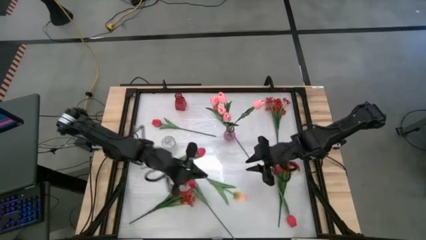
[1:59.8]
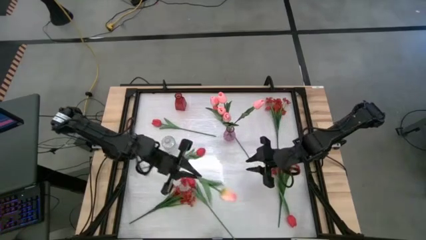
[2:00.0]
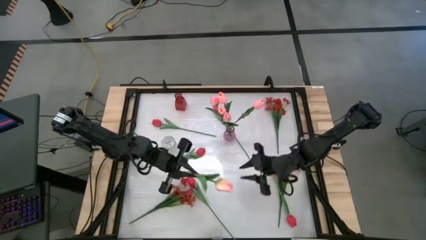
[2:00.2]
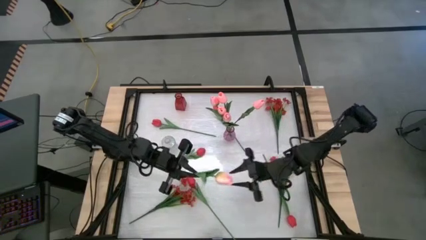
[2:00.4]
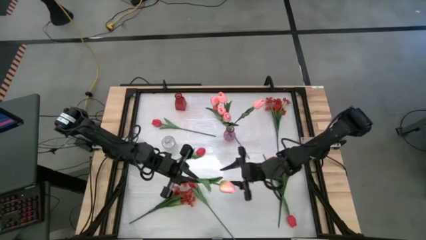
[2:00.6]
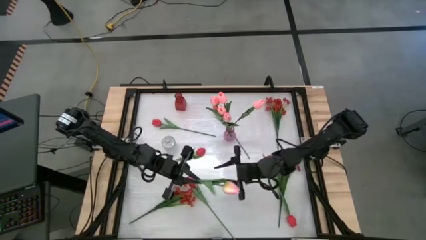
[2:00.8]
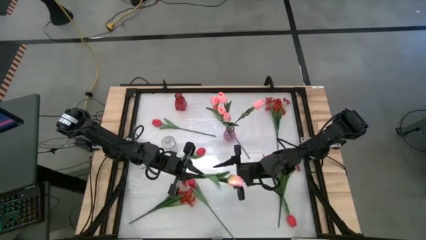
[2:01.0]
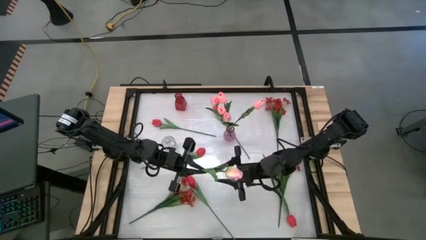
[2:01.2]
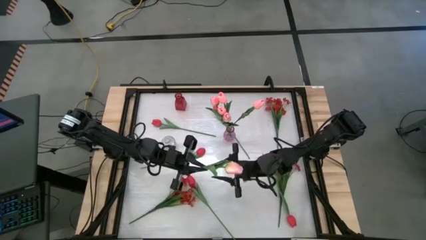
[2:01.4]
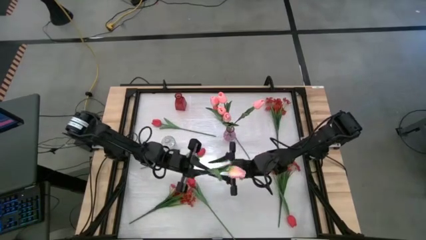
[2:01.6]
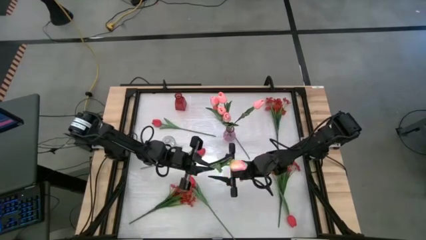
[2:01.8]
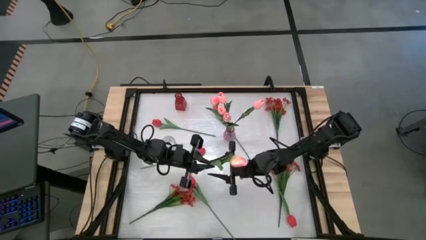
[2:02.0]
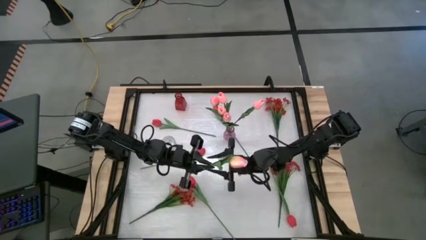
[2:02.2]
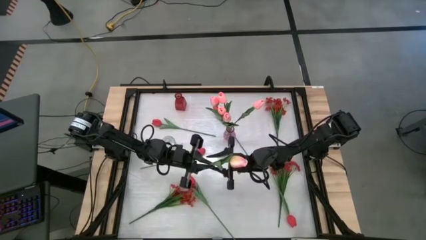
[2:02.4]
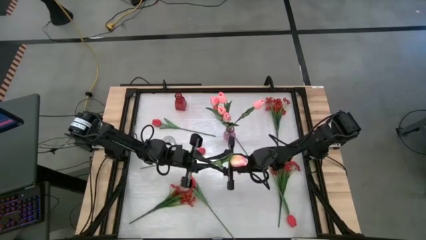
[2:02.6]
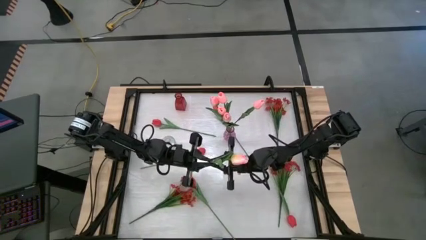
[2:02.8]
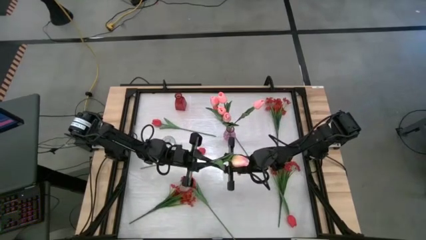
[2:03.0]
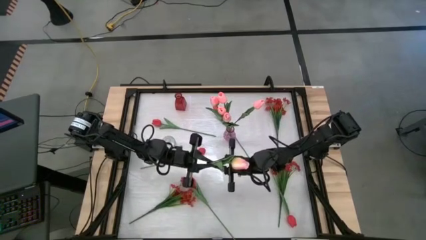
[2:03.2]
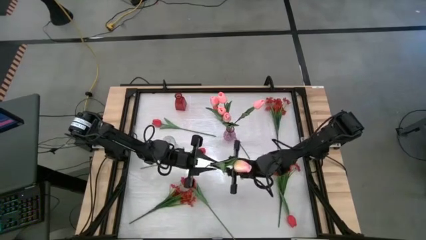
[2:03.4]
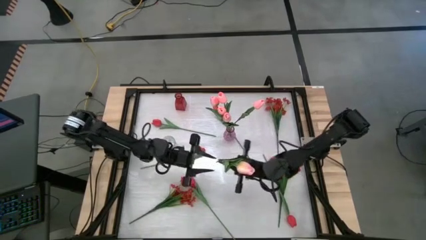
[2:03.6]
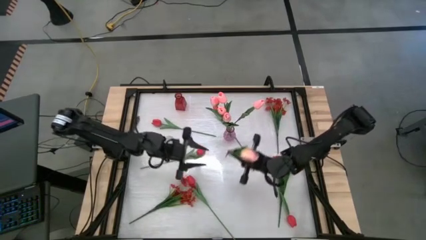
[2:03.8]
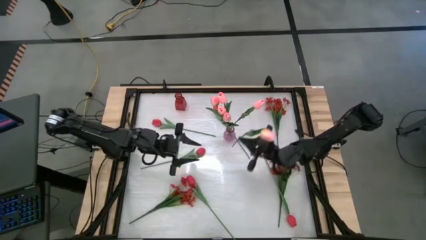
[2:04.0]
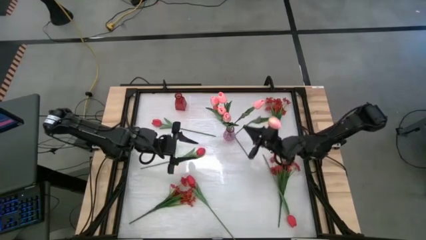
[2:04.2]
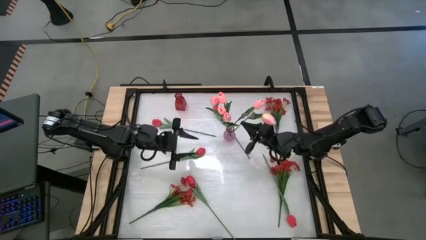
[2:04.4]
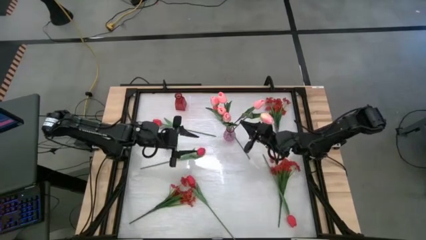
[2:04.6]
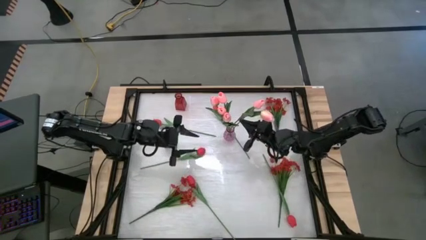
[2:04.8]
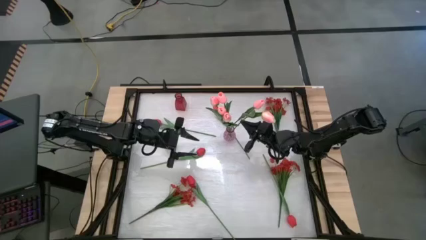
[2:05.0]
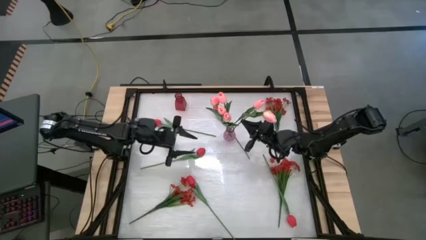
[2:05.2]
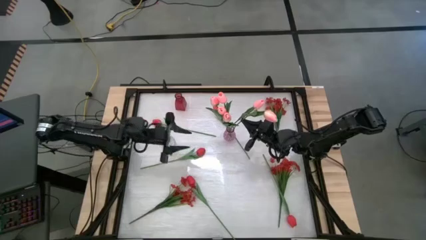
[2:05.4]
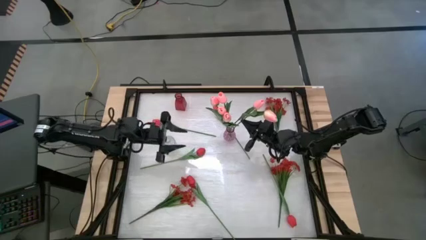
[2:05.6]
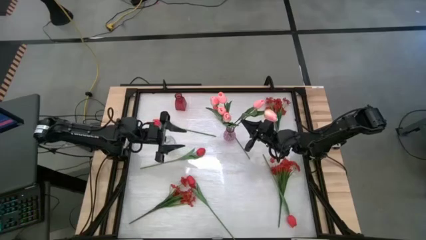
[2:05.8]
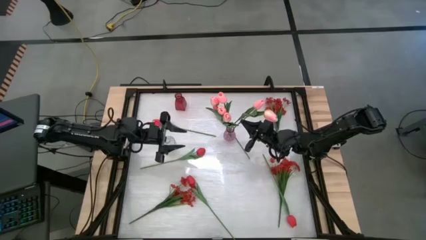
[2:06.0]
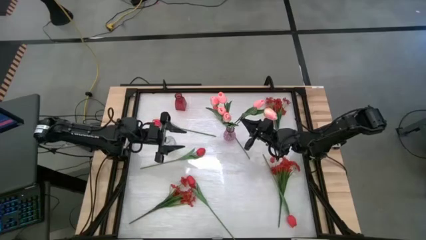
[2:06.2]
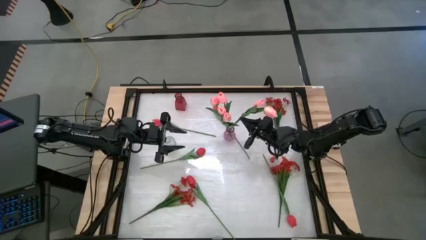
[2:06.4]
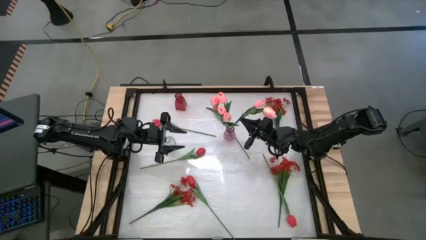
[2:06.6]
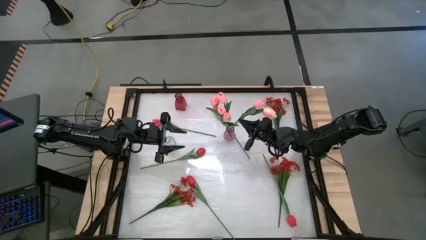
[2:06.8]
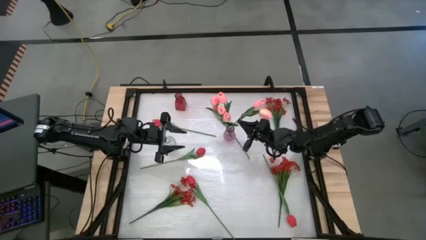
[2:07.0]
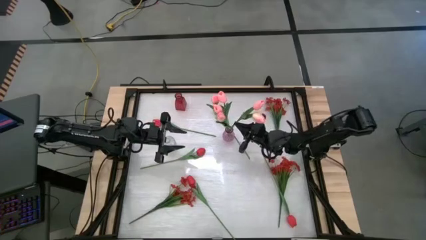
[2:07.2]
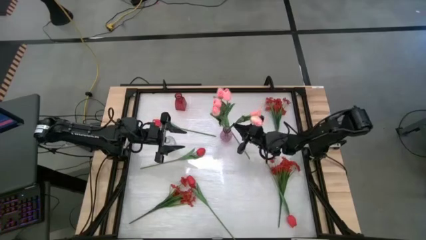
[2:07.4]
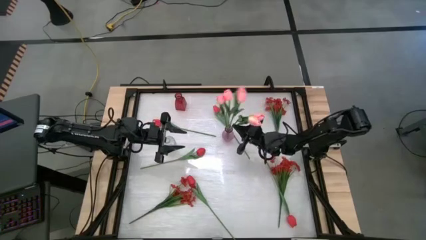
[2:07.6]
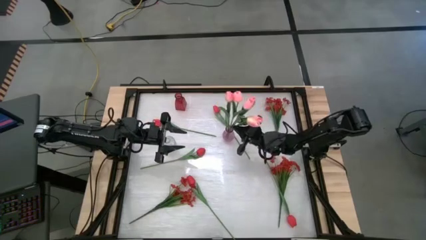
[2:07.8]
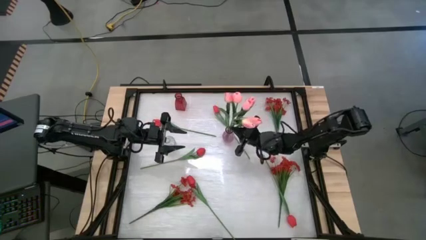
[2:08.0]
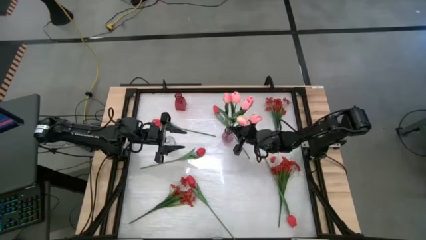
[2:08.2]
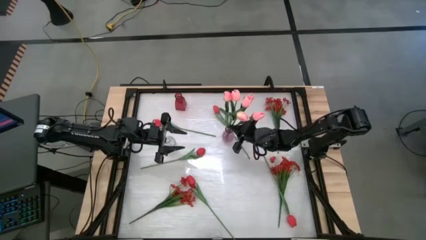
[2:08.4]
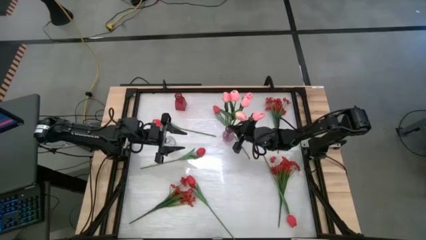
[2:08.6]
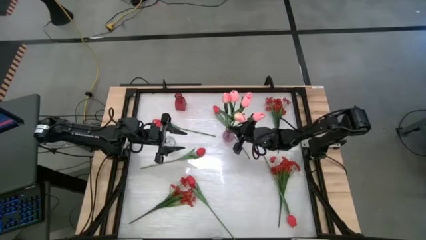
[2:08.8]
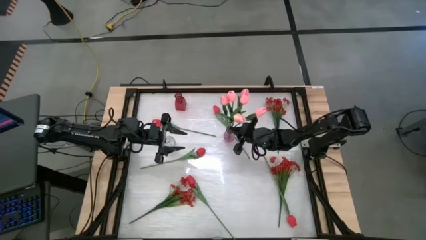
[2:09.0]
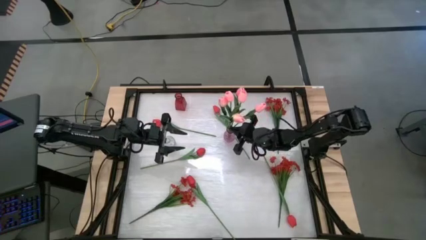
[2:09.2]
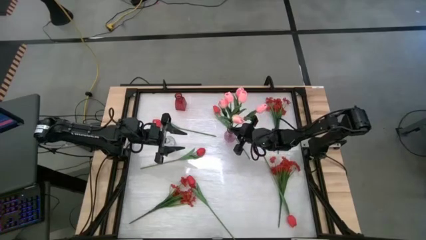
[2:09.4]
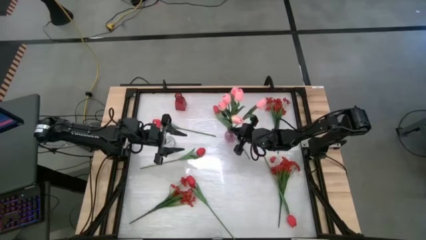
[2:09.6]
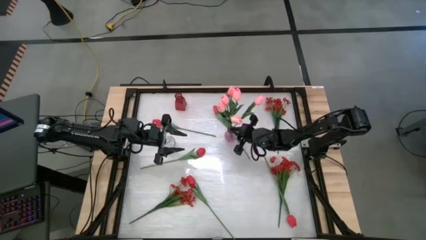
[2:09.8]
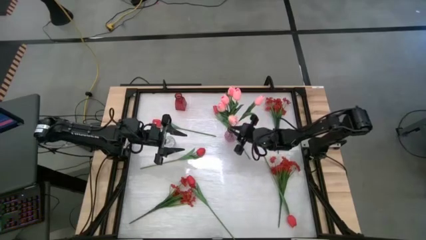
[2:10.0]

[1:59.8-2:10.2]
Task: Sort flowers into vase by color
Put the pink tulip into the purple vase

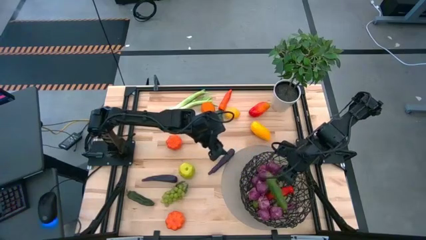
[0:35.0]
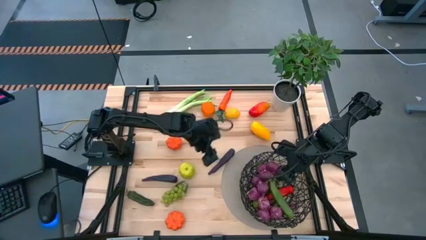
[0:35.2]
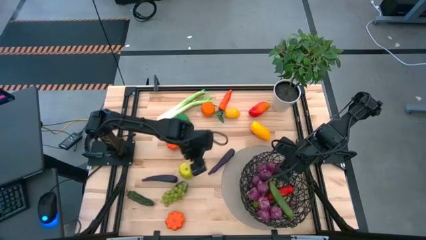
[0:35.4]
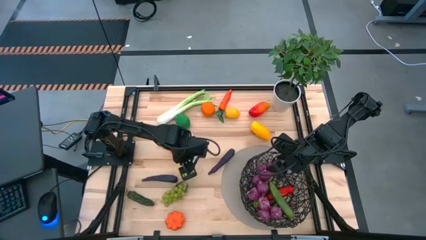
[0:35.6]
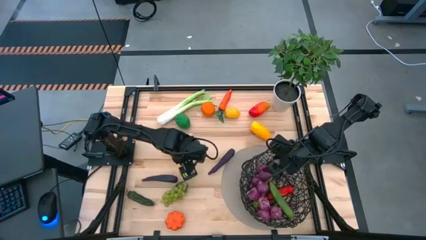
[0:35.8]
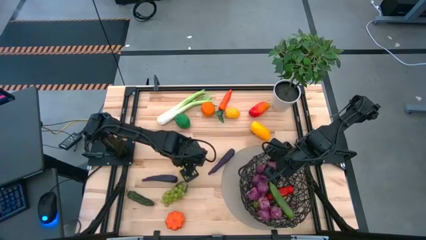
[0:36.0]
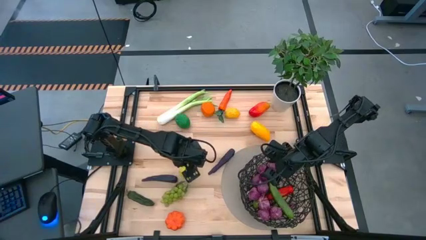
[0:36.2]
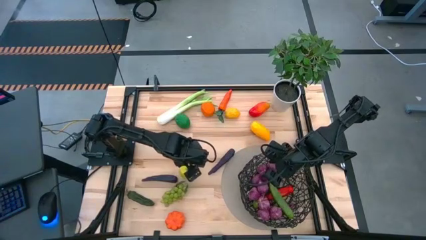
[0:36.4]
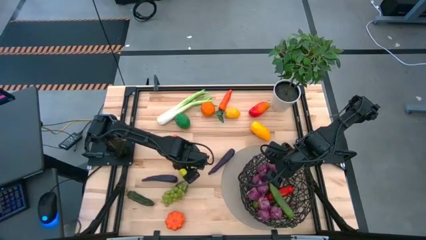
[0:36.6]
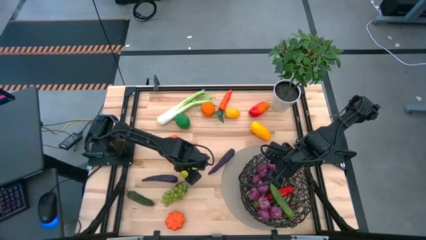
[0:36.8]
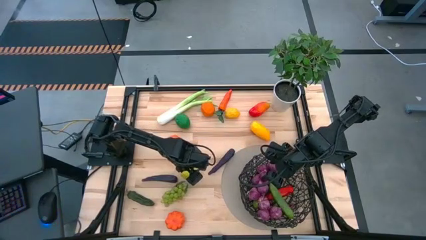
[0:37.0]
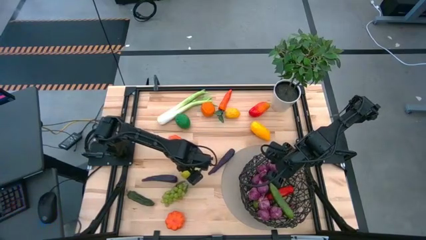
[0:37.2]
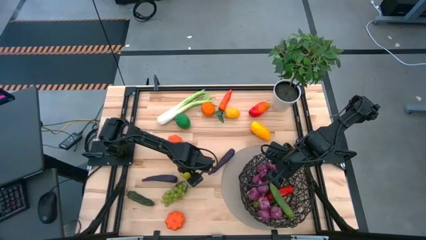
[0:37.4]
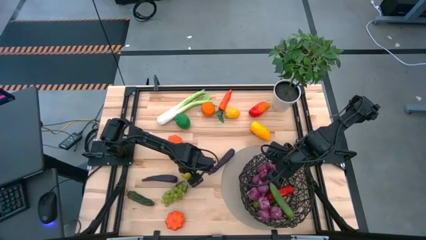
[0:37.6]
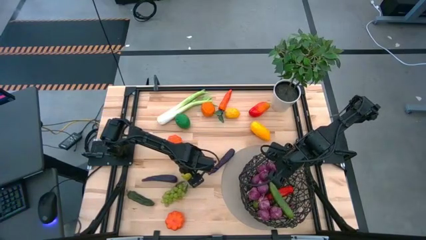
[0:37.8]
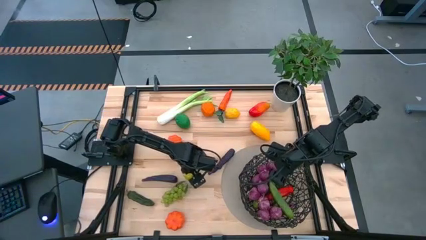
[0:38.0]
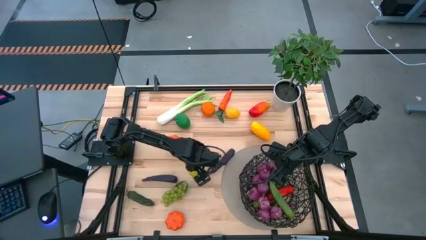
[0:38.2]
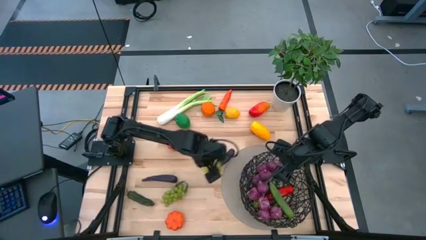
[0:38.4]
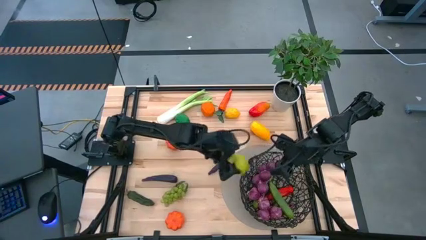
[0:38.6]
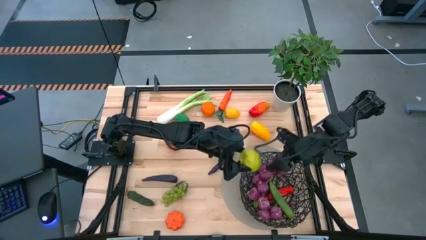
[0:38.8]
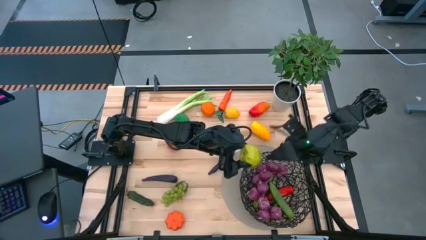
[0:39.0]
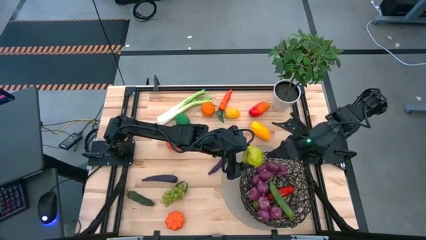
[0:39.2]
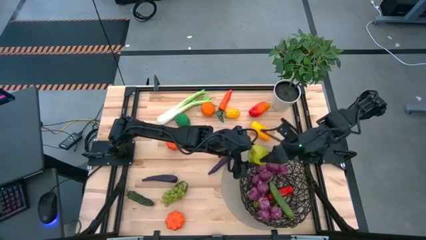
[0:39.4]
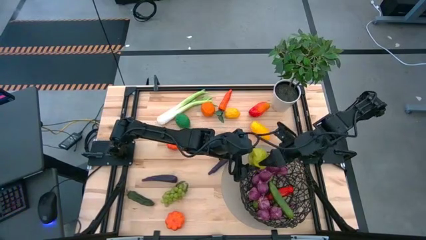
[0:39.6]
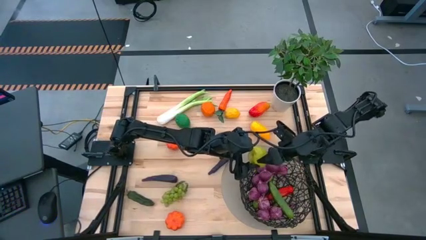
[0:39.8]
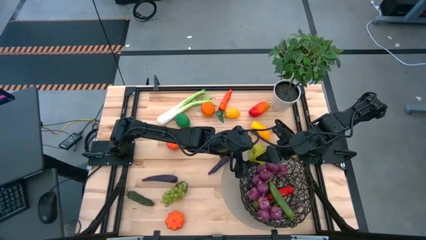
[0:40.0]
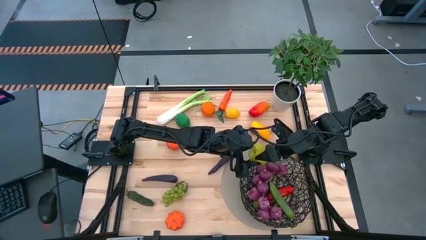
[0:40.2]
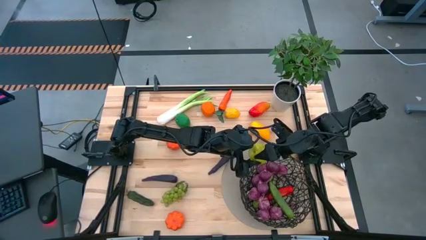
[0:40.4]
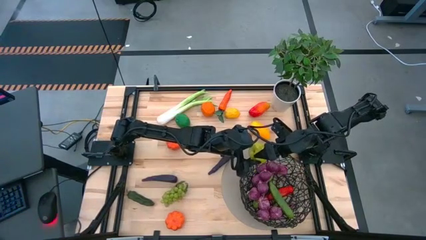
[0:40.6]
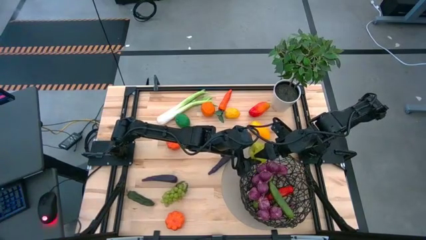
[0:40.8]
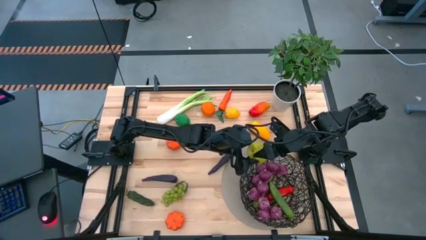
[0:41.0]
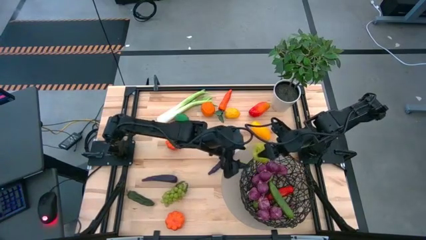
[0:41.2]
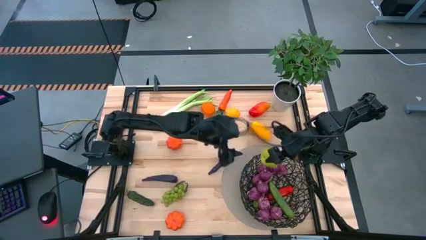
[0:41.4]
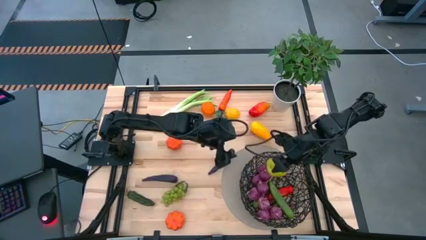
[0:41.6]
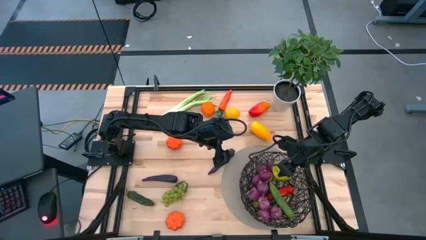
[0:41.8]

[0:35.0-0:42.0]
Task: Build produce basket
Put the green apple into the black basket
